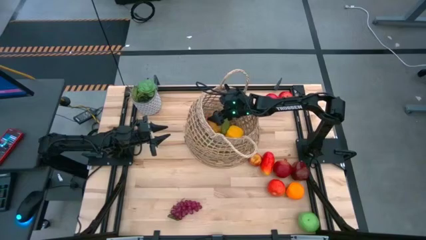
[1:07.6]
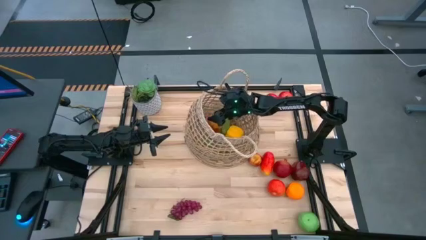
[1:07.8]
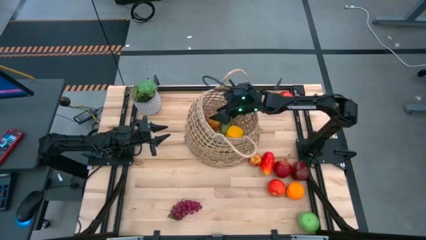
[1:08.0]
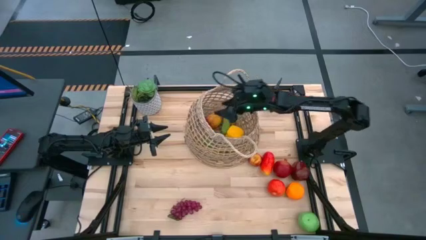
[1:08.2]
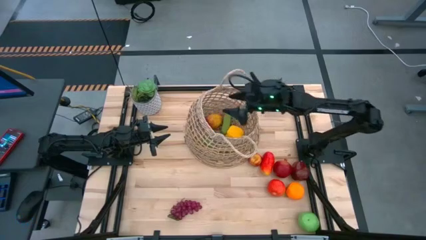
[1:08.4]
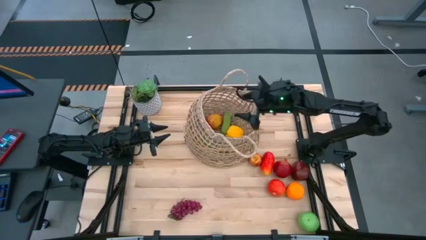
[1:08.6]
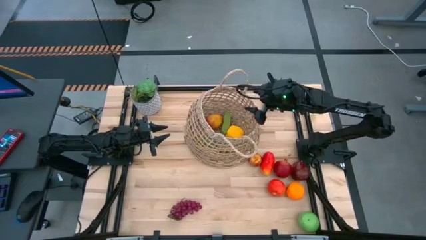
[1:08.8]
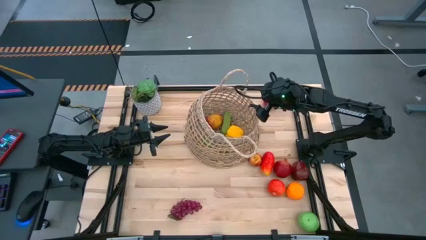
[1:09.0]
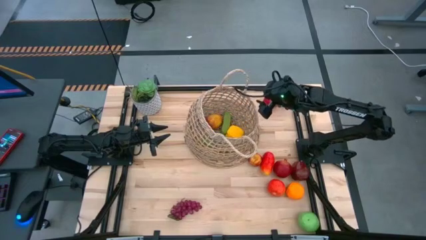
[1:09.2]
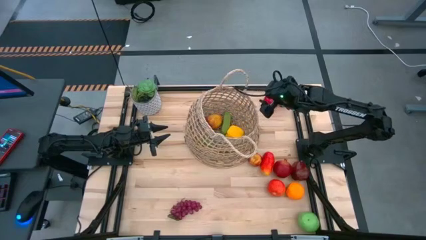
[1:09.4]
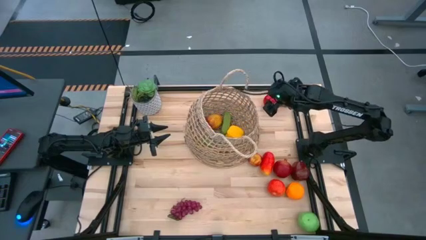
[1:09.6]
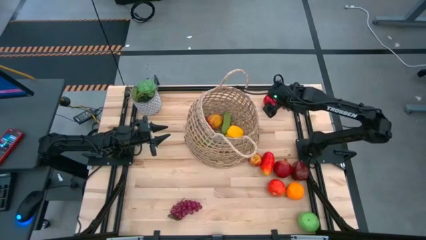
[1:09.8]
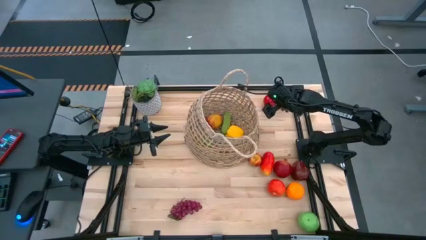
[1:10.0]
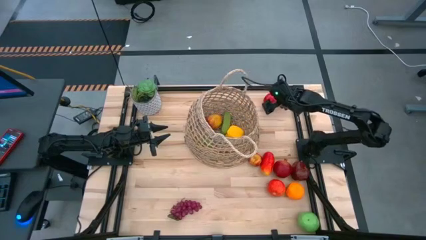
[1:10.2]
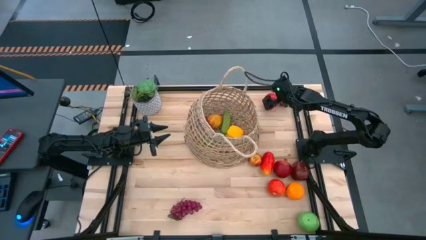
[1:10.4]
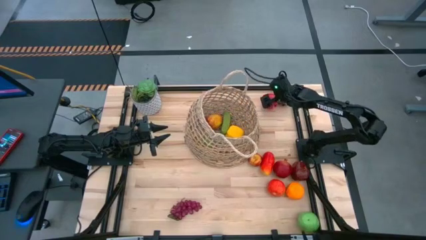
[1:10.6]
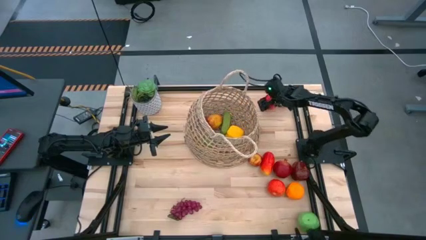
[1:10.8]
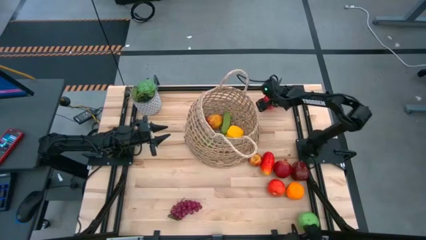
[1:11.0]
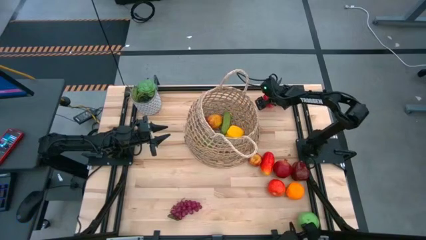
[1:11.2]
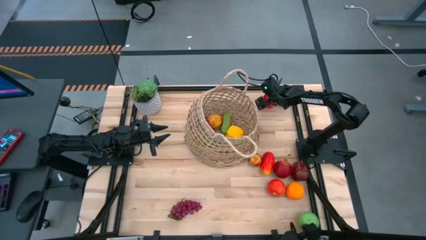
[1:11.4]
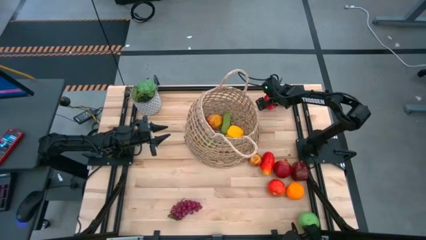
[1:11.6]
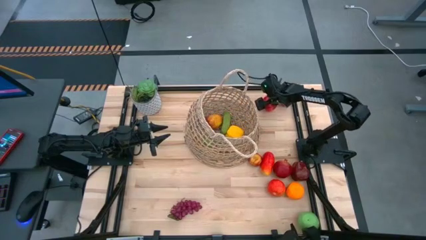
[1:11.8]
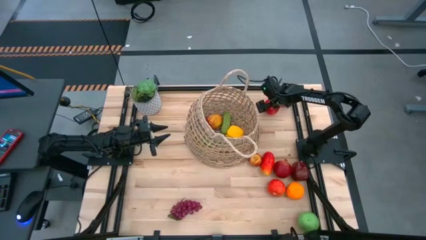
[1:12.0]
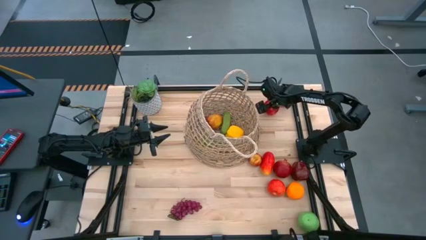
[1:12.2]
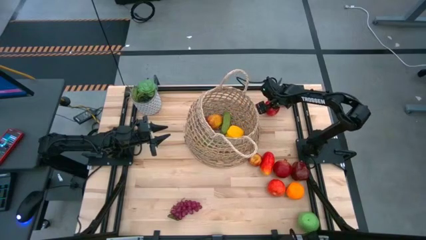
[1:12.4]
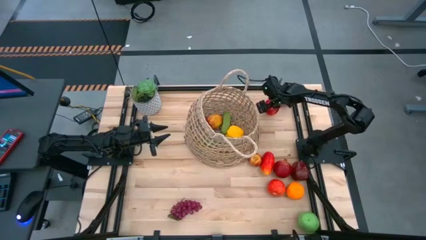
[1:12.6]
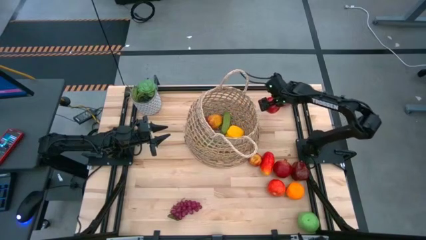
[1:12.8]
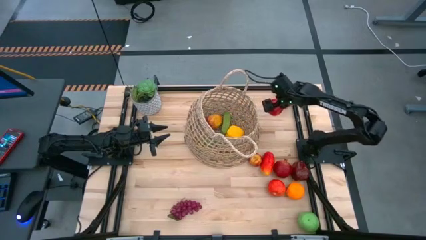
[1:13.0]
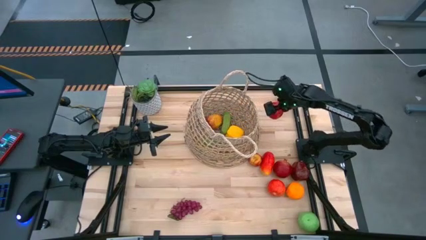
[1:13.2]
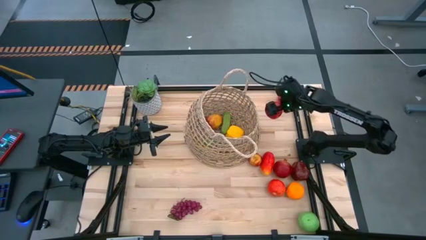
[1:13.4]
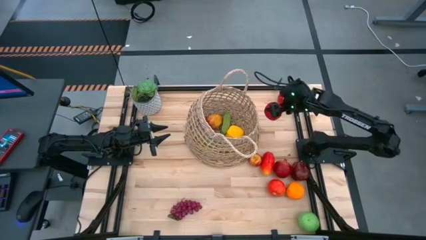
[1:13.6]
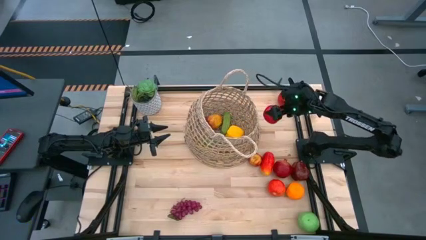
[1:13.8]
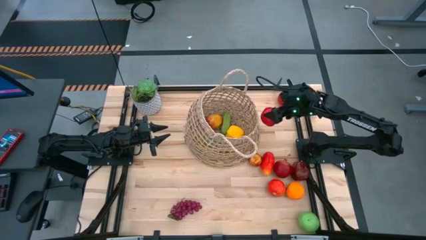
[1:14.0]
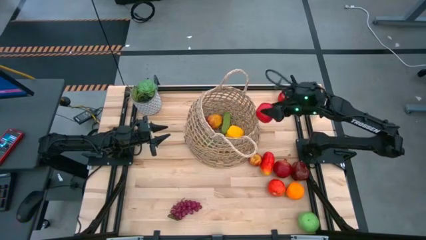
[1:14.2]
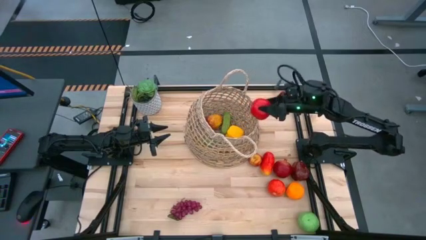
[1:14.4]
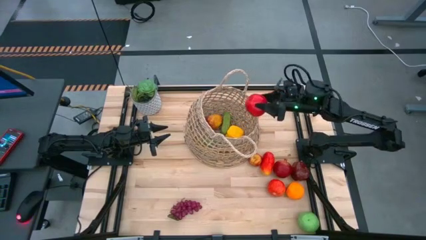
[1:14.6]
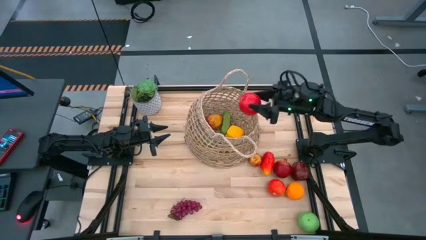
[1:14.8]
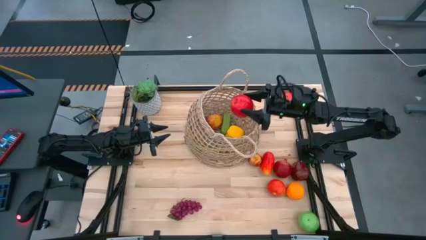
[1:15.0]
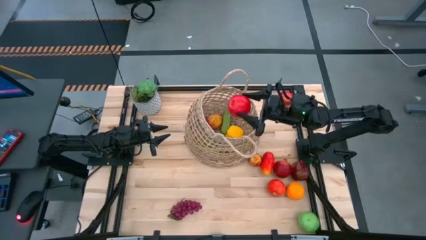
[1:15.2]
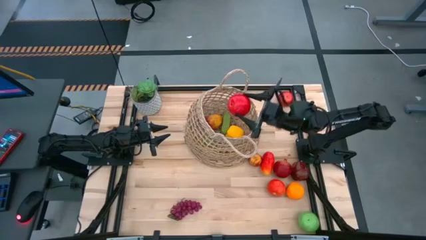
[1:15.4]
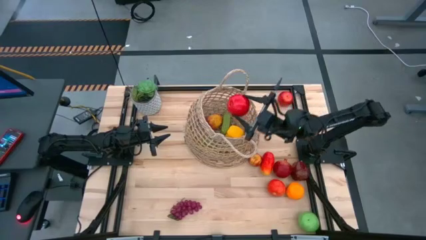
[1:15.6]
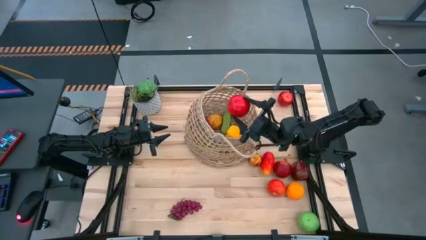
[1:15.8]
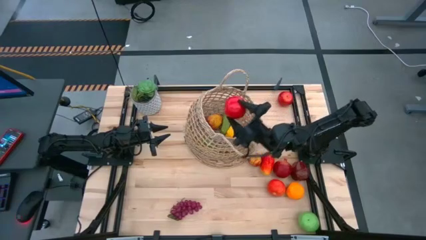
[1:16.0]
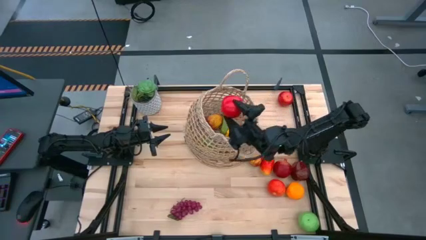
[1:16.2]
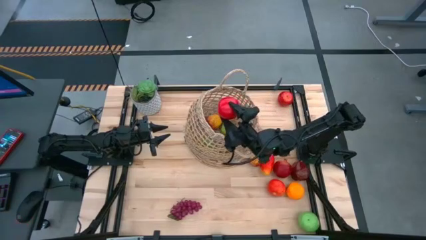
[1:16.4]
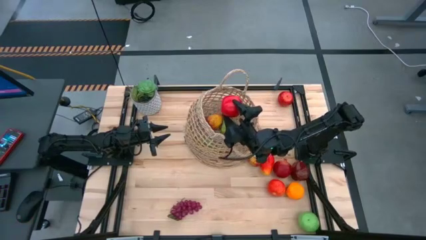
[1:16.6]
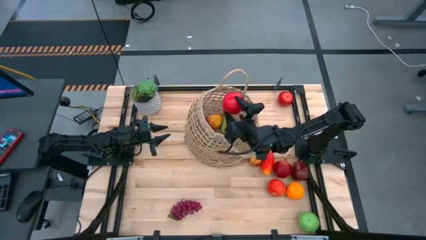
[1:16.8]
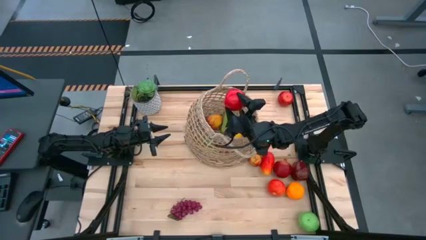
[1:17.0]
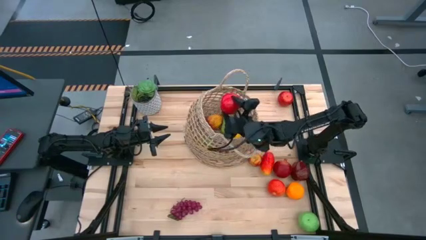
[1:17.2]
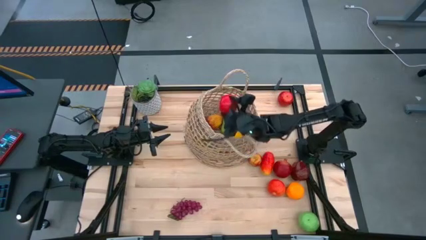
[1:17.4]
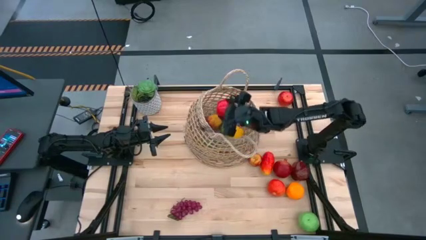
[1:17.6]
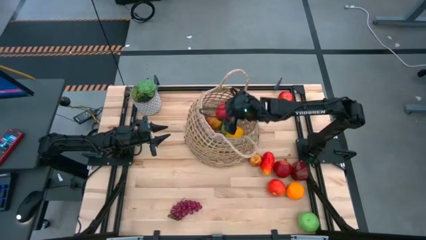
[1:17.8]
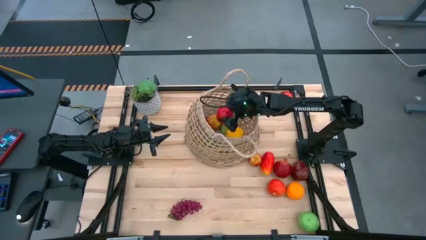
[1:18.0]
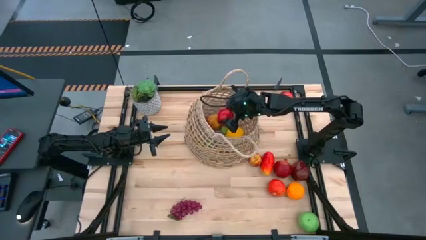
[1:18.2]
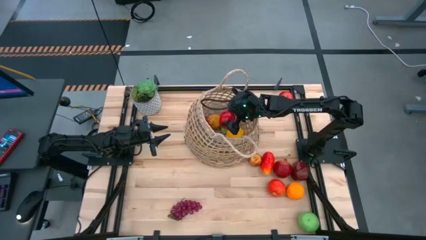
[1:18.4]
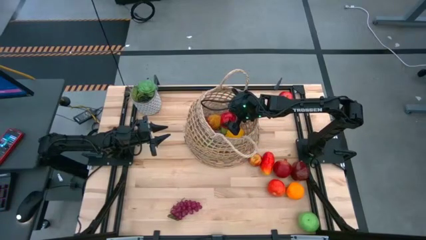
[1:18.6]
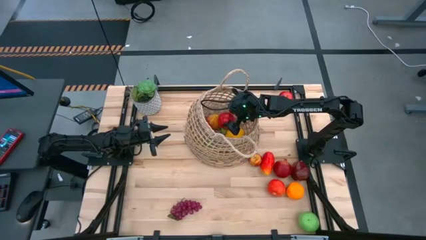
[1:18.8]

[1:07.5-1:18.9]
Task: Build produce basket
Put the red apple into the brown basket
